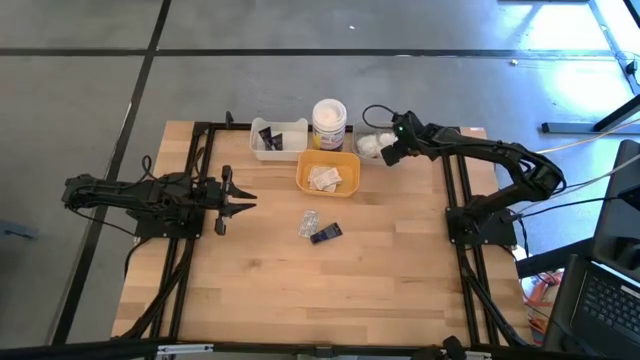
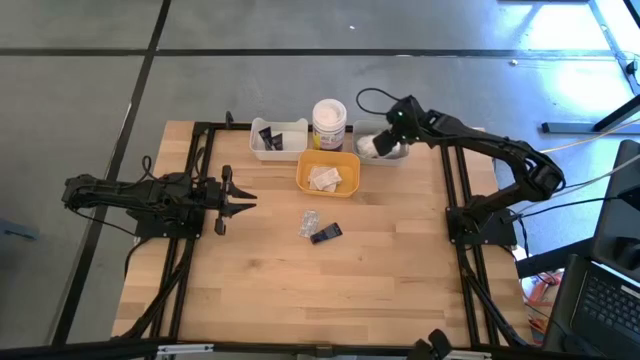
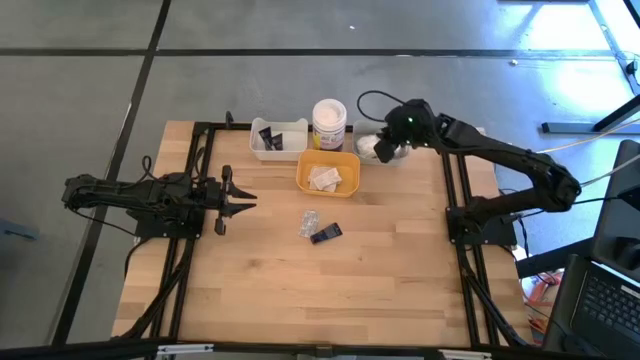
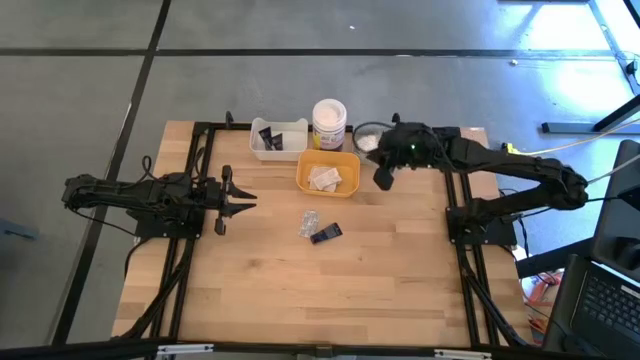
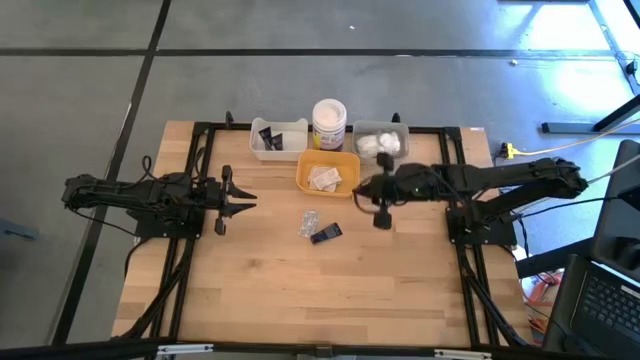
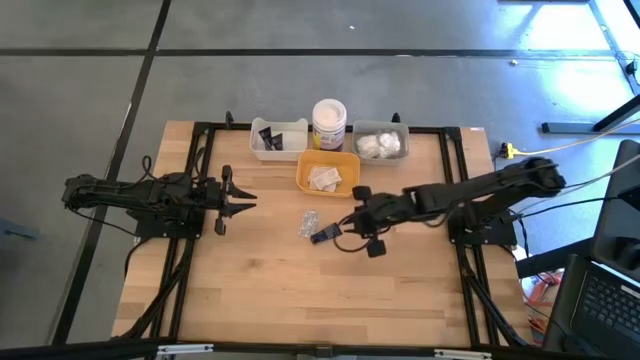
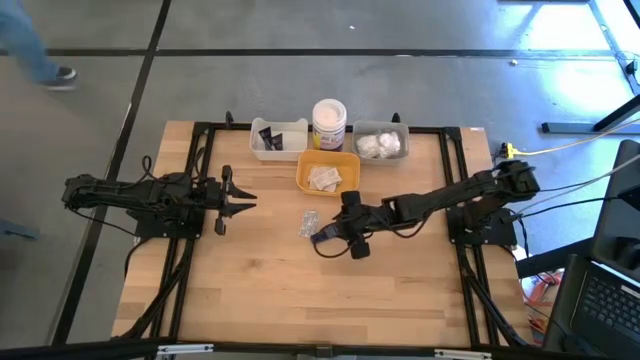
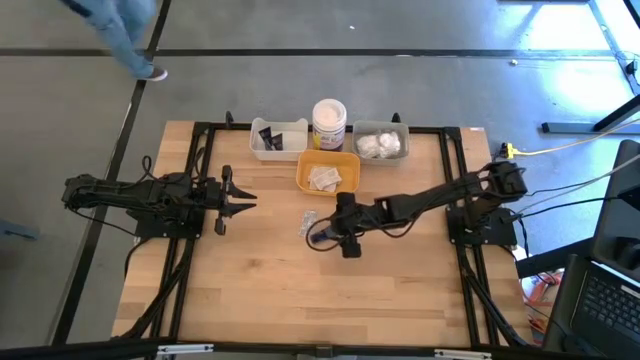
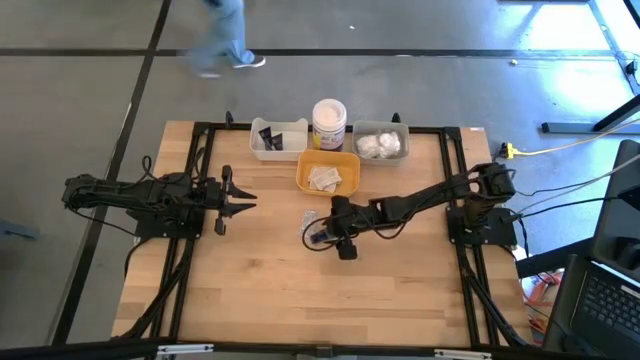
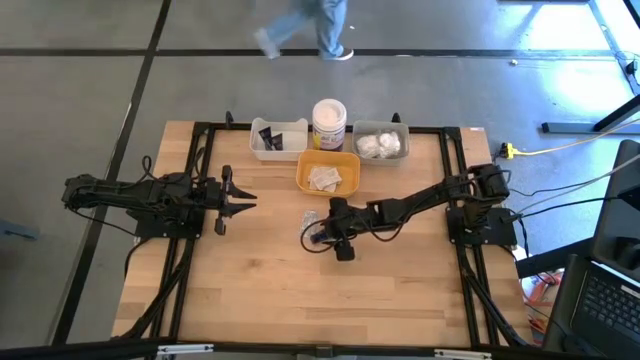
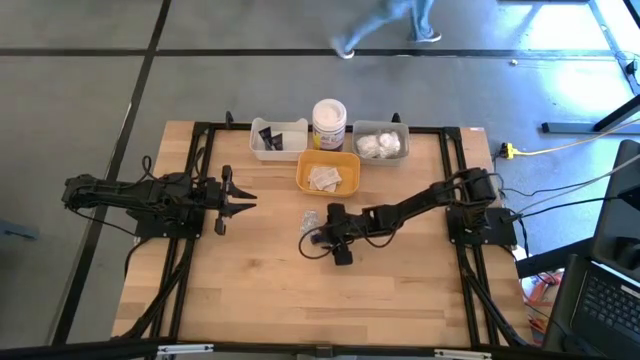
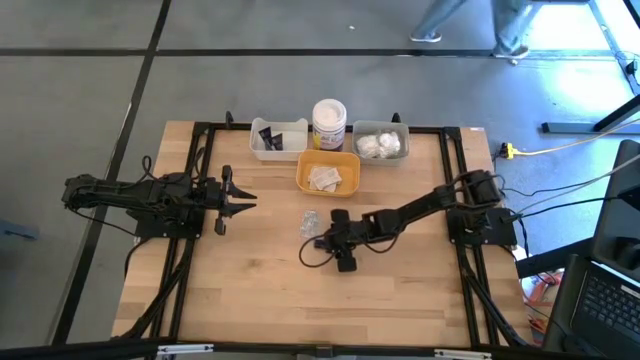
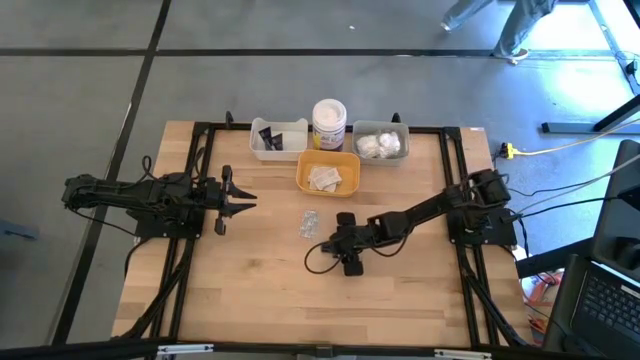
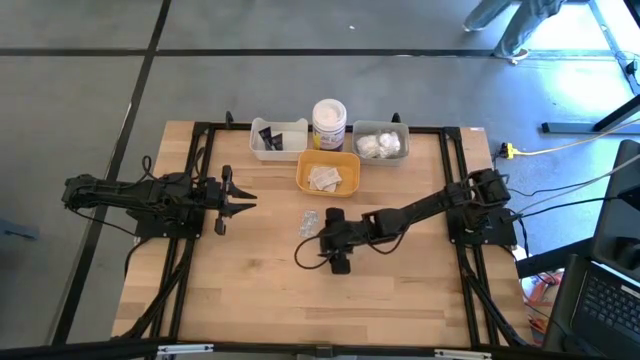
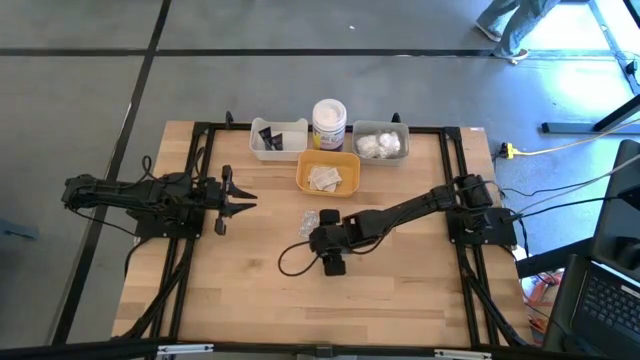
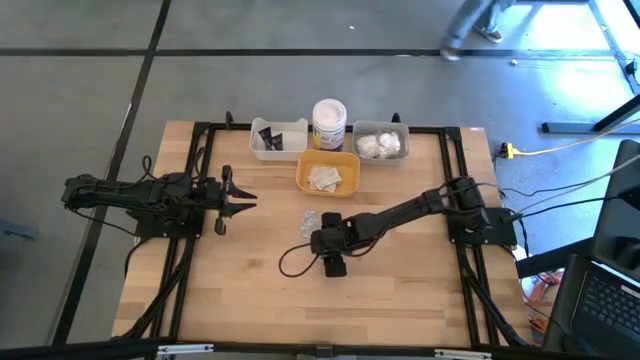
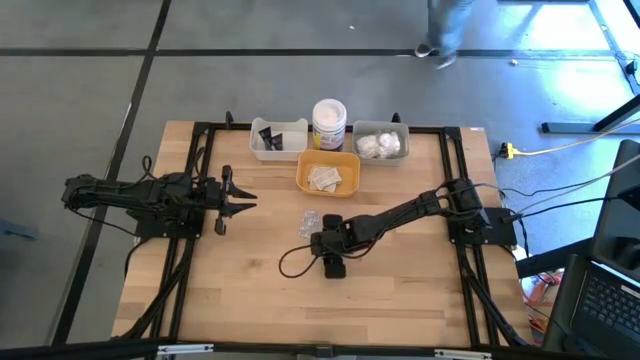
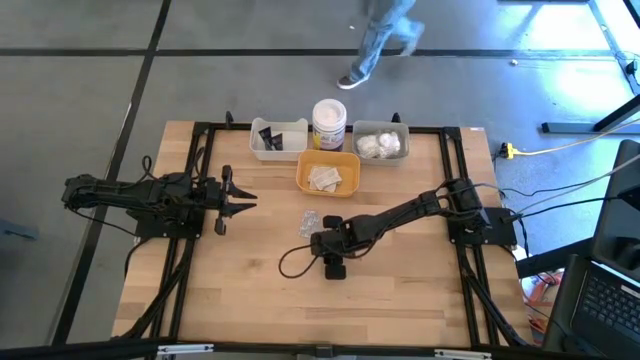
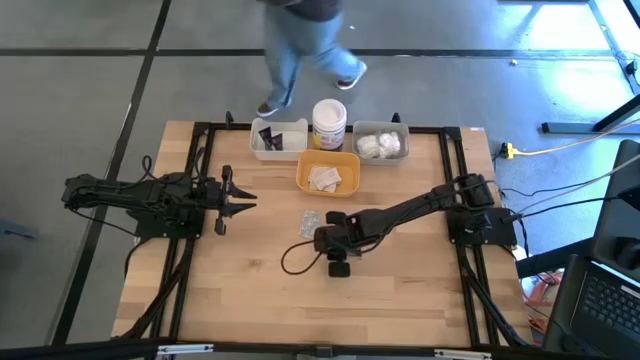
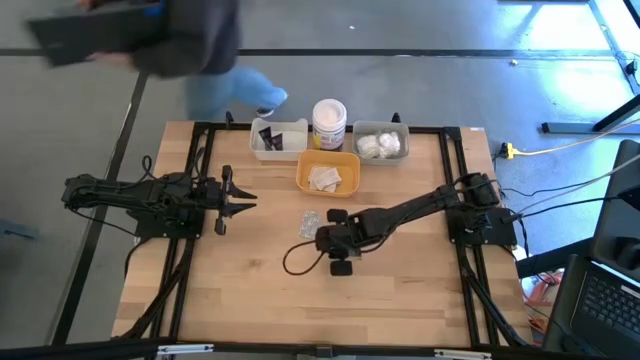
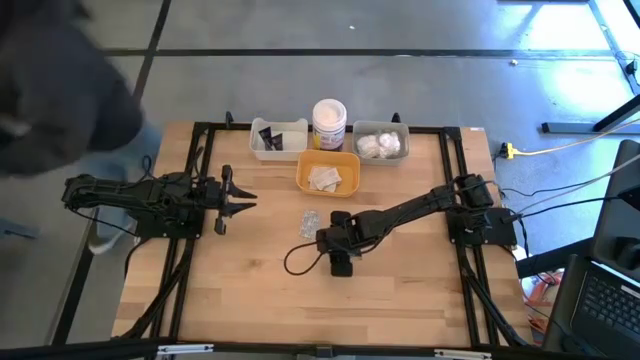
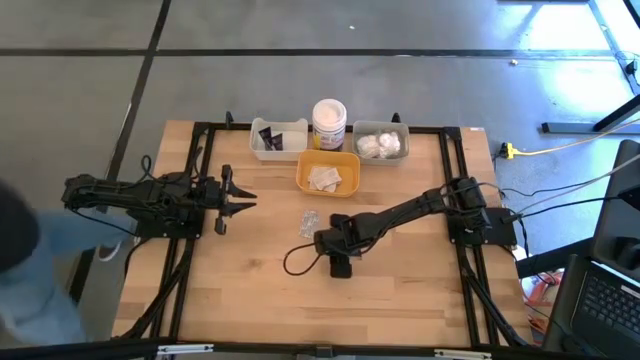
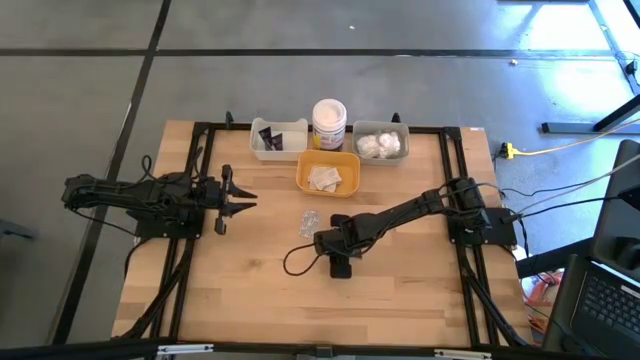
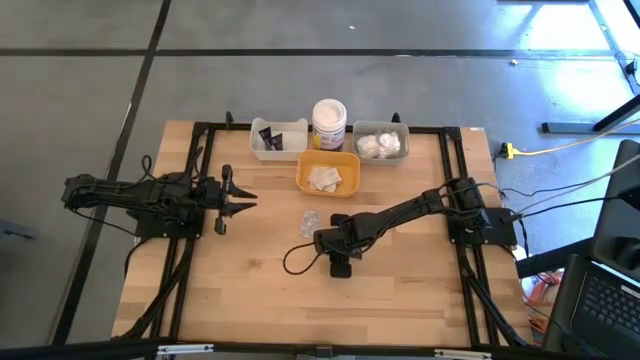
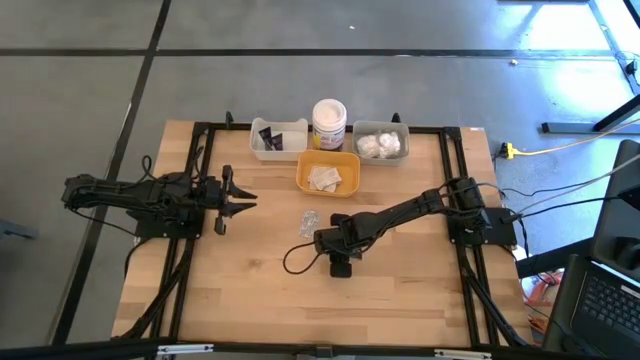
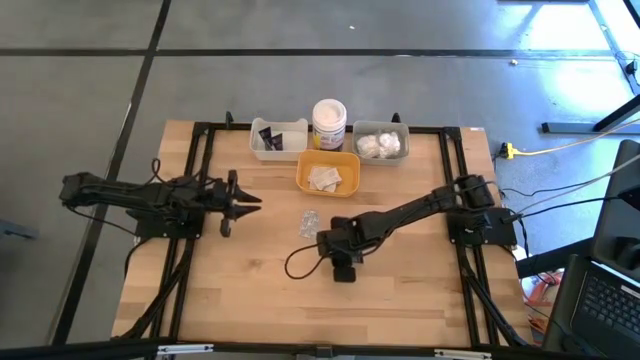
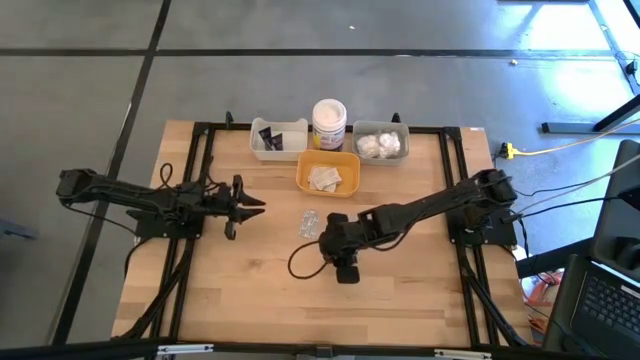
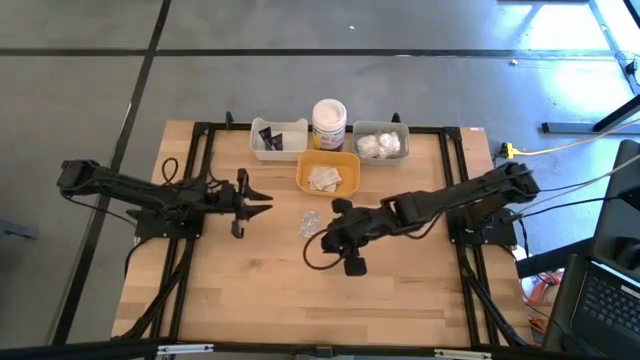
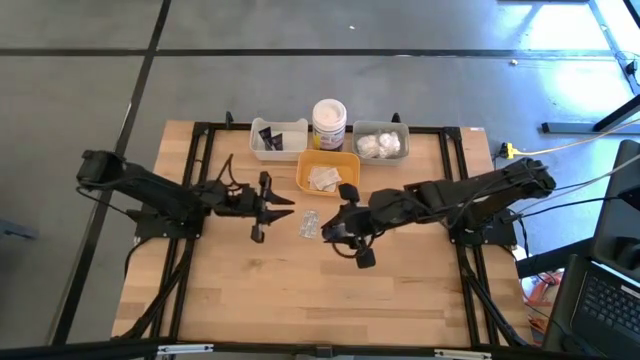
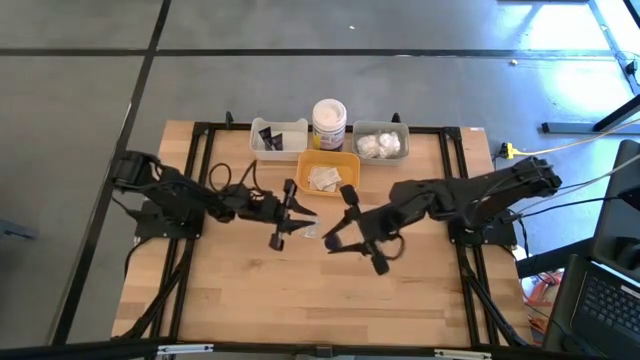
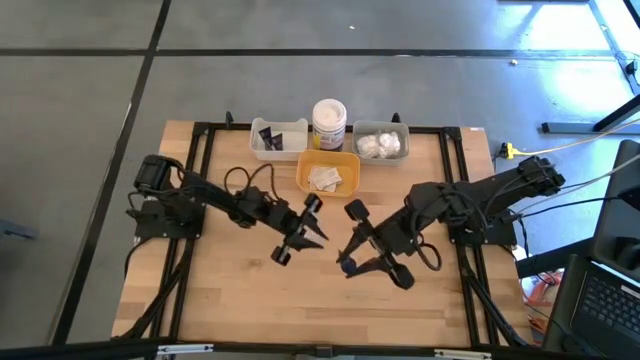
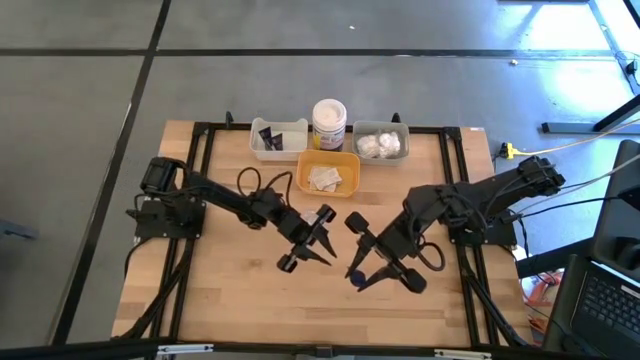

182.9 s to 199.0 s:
Task: Pick & Place Travel size toiletries
Put the blue shave cream into the white bin

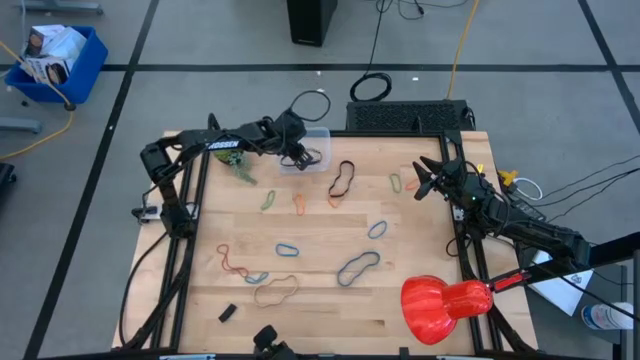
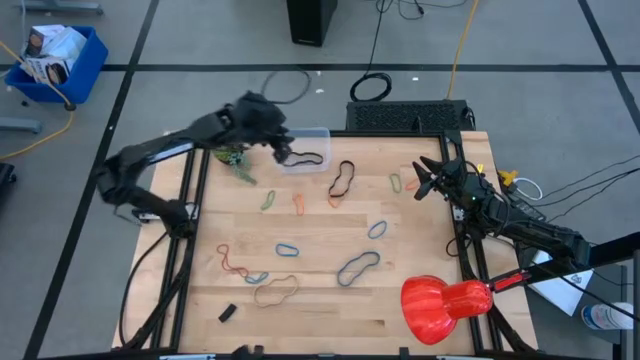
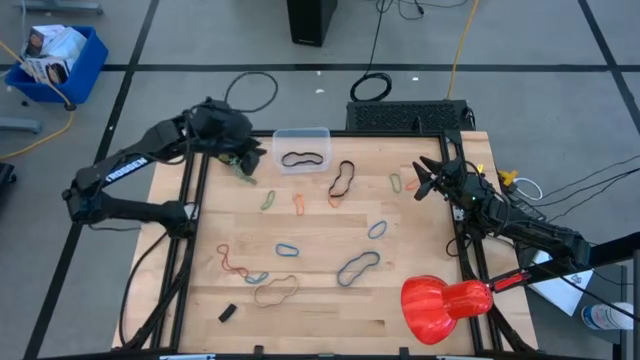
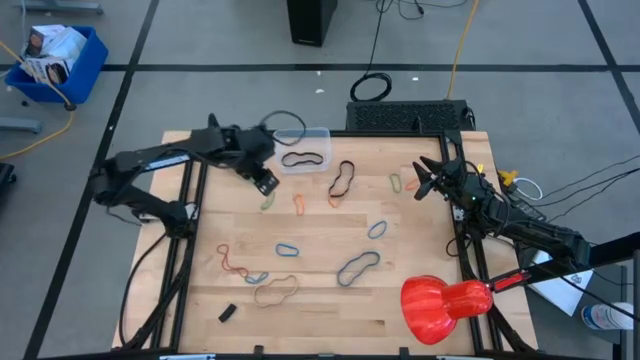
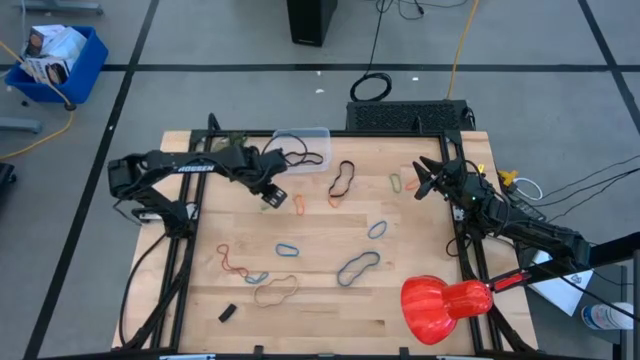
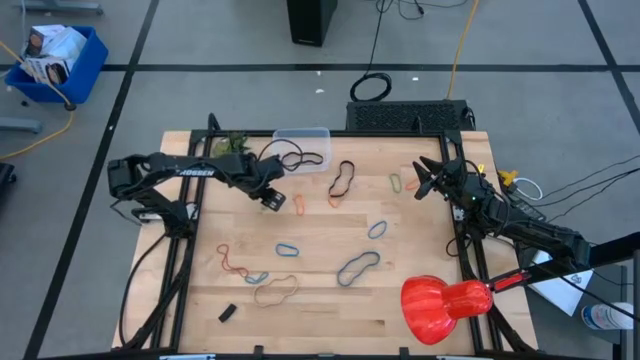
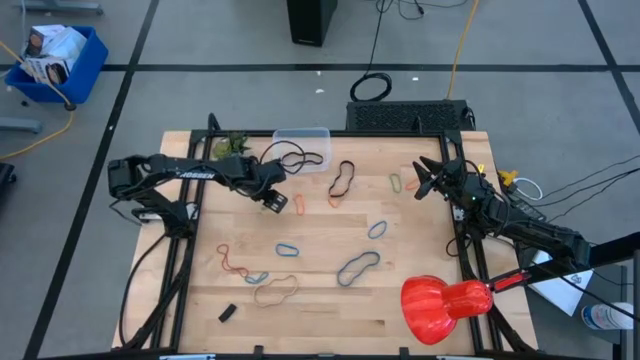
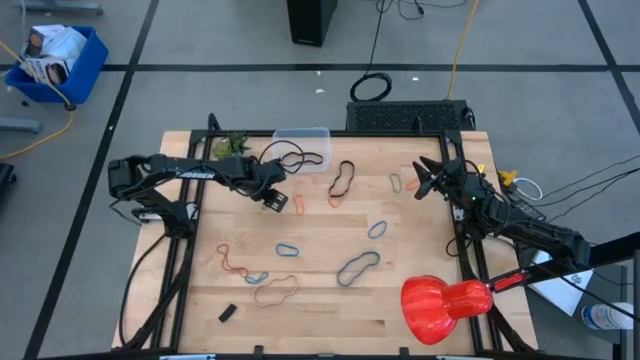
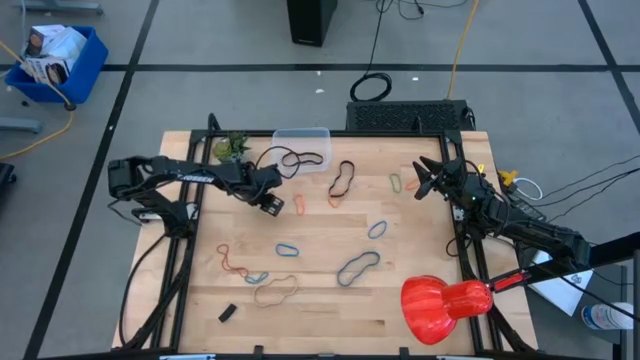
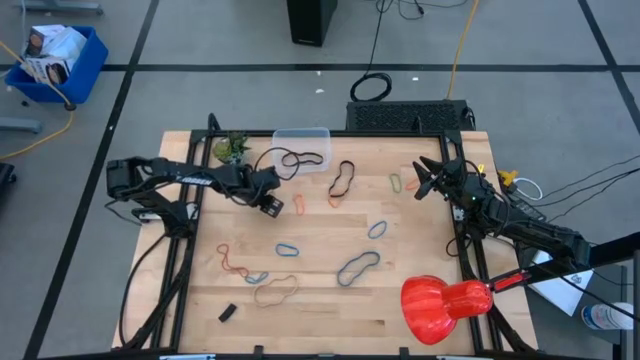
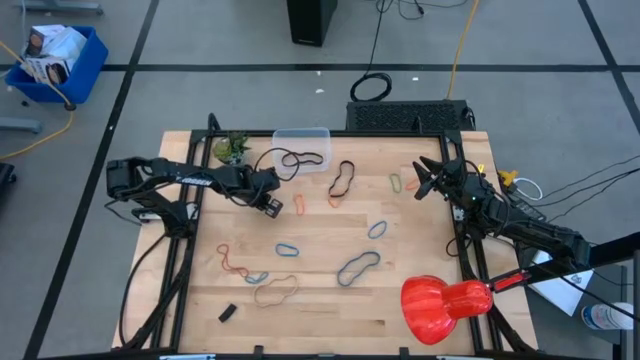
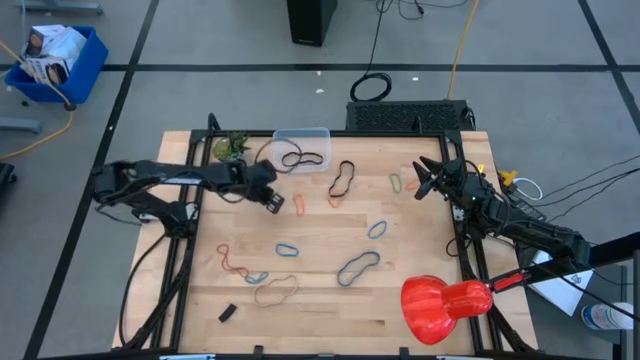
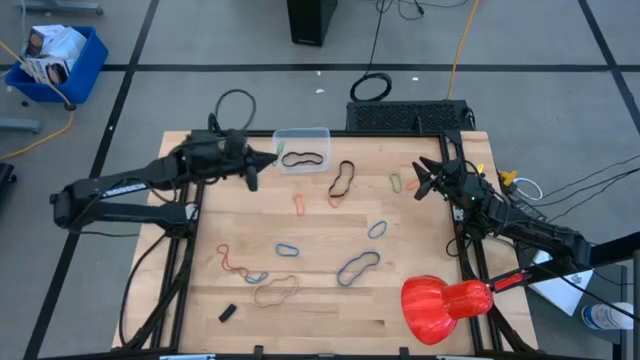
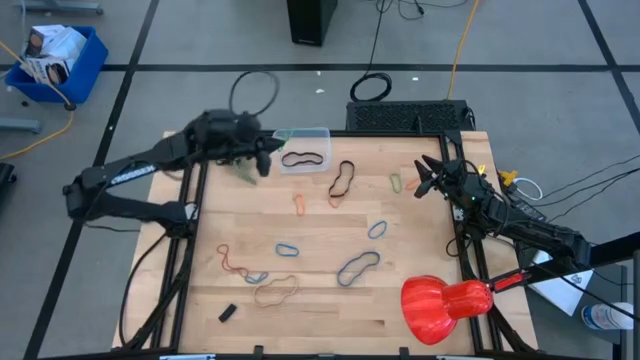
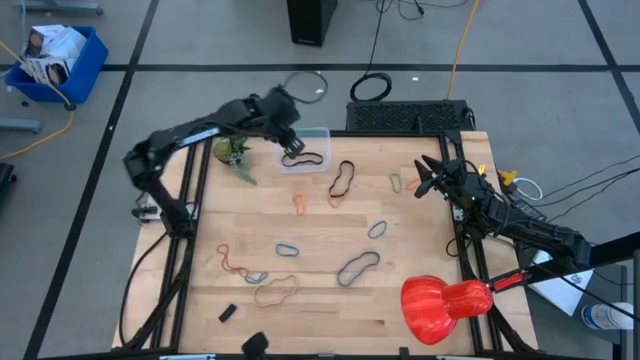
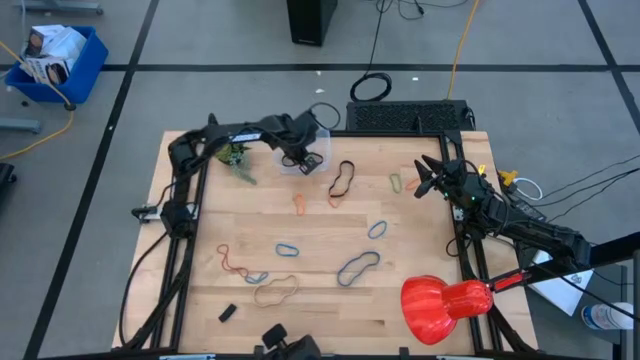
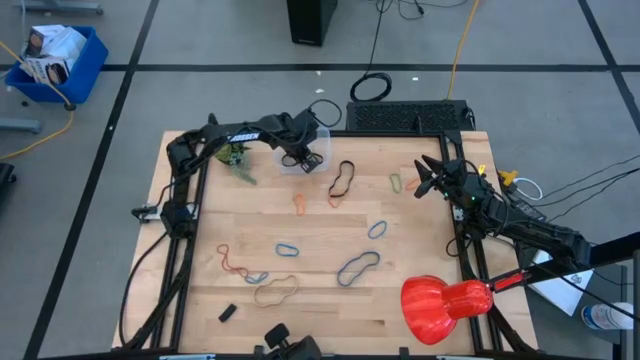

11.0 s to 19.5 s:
Task: Pick and place rubber bands into bin
Put the left green rubber band into the transparent bin
